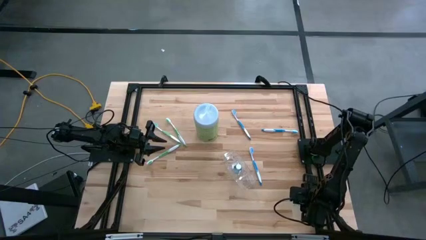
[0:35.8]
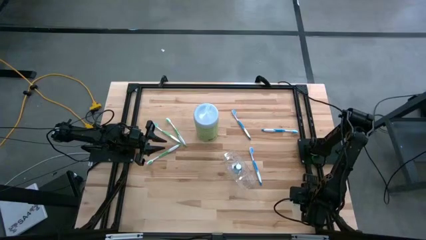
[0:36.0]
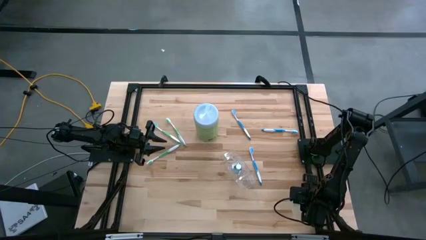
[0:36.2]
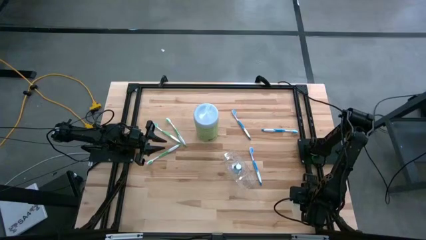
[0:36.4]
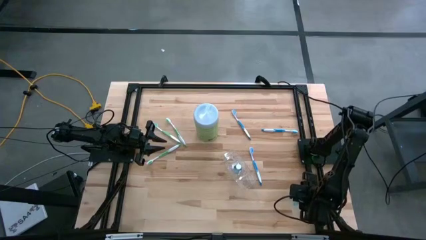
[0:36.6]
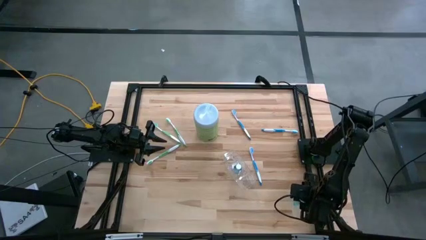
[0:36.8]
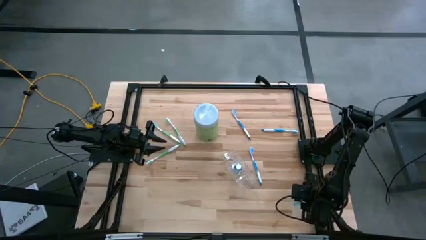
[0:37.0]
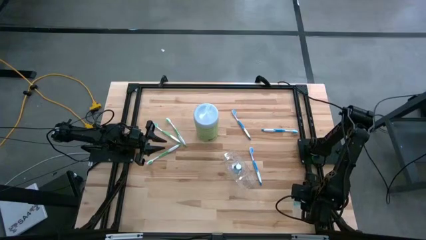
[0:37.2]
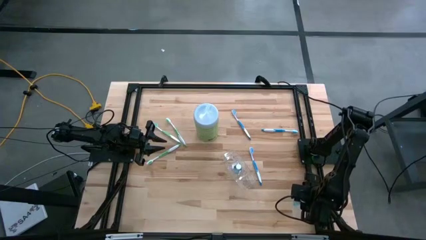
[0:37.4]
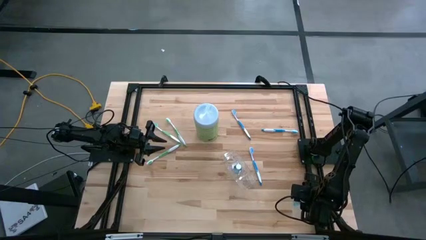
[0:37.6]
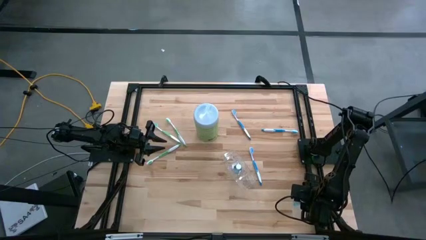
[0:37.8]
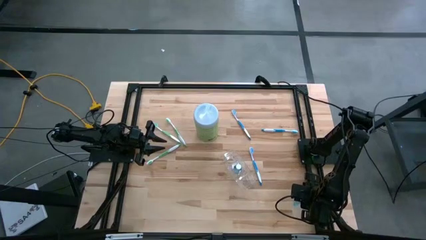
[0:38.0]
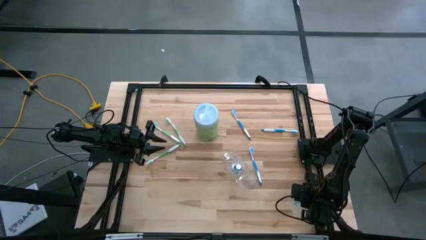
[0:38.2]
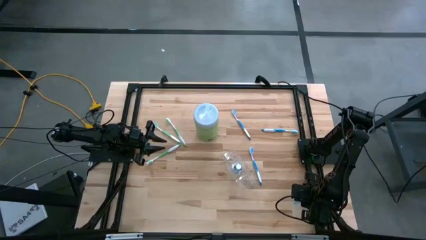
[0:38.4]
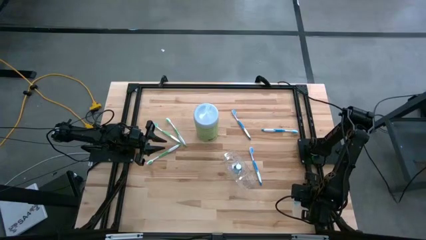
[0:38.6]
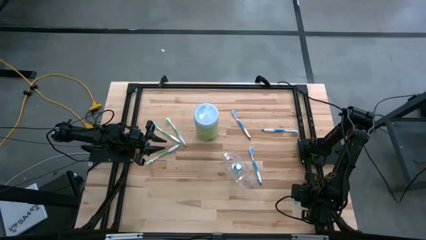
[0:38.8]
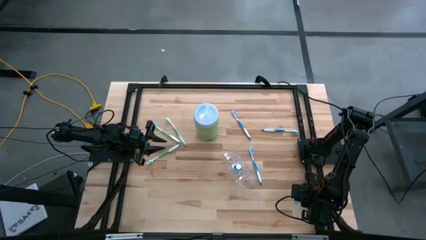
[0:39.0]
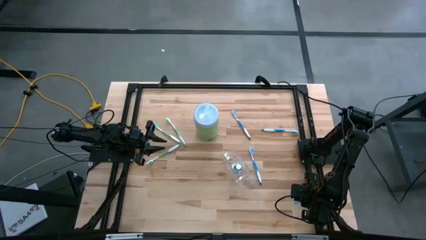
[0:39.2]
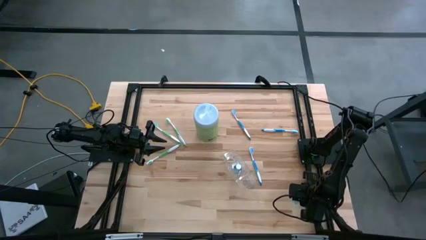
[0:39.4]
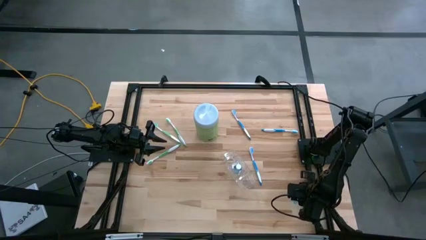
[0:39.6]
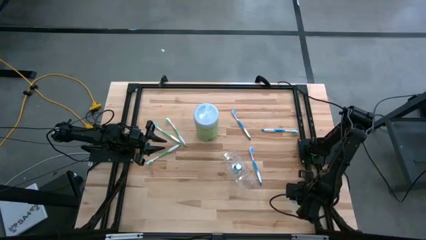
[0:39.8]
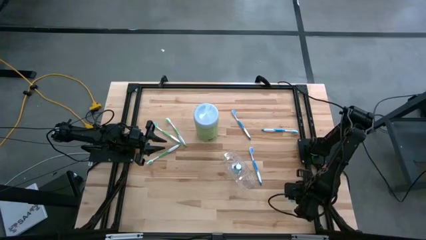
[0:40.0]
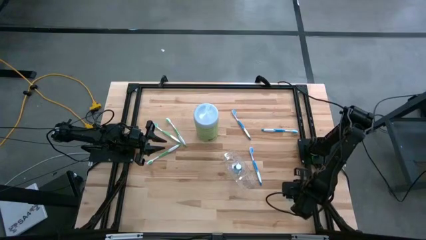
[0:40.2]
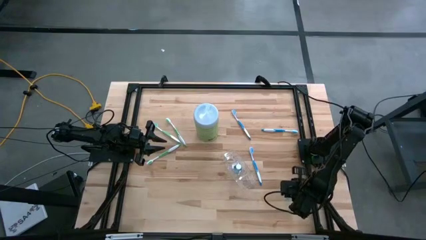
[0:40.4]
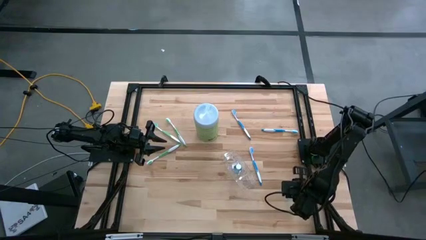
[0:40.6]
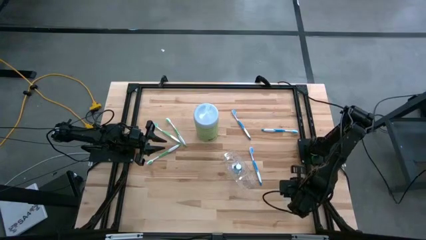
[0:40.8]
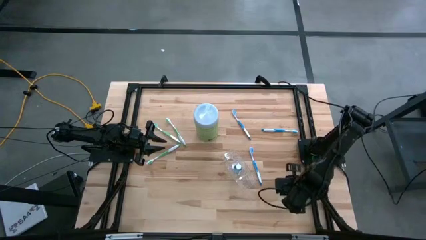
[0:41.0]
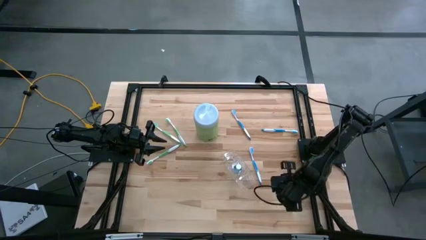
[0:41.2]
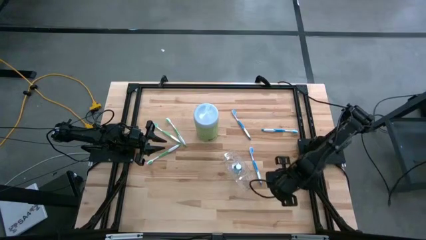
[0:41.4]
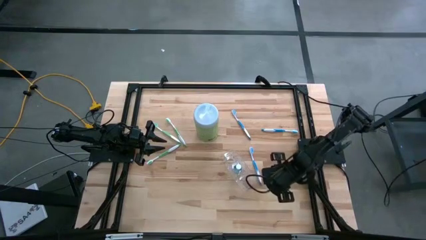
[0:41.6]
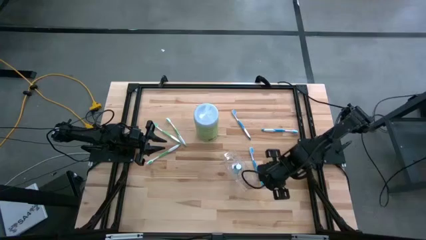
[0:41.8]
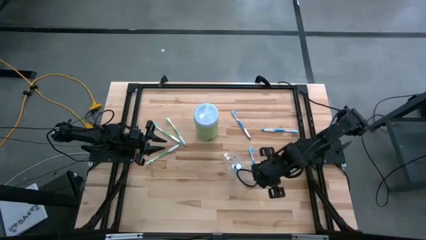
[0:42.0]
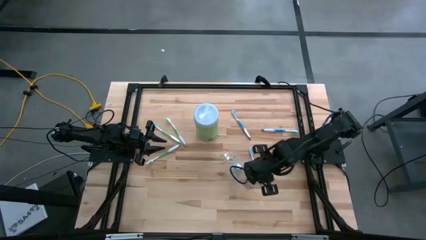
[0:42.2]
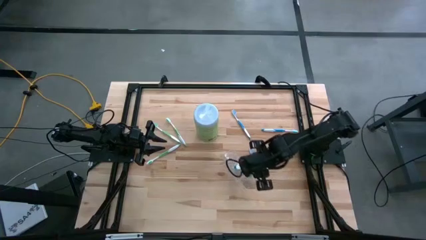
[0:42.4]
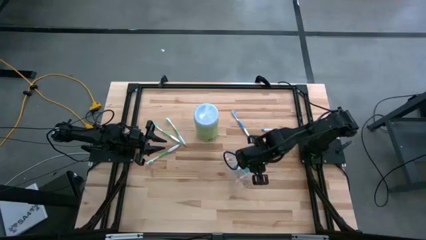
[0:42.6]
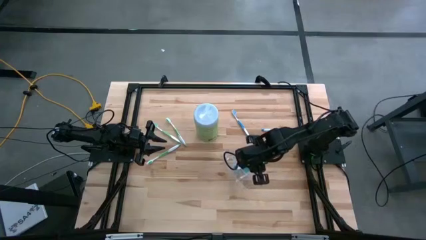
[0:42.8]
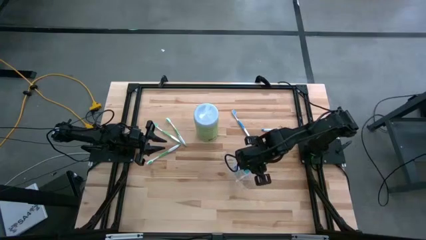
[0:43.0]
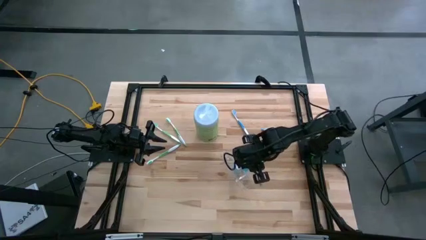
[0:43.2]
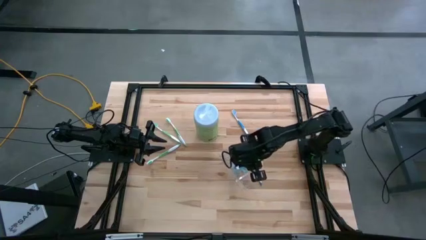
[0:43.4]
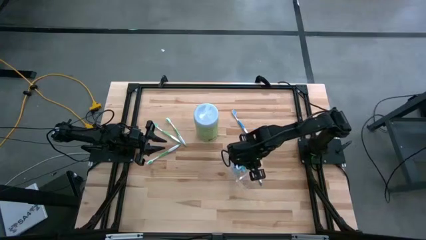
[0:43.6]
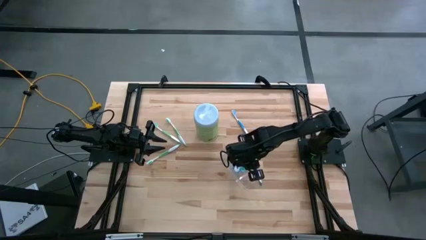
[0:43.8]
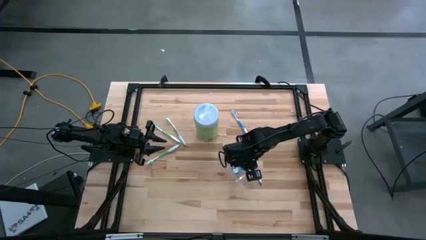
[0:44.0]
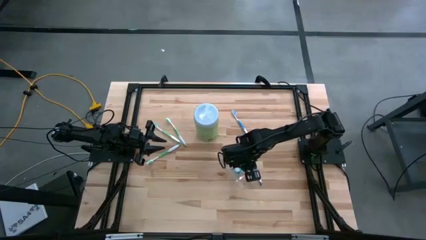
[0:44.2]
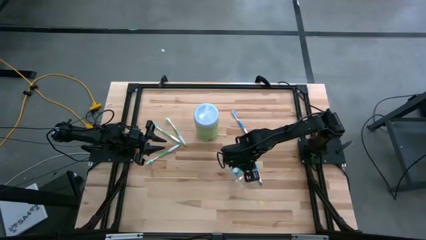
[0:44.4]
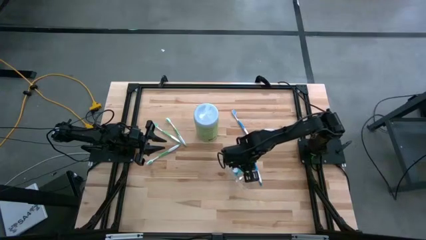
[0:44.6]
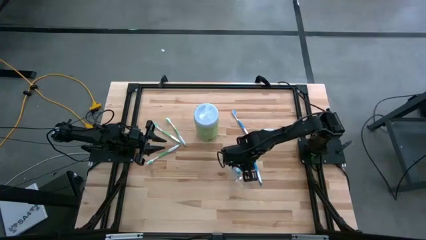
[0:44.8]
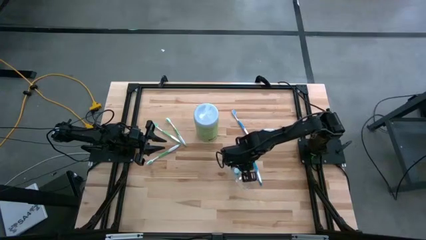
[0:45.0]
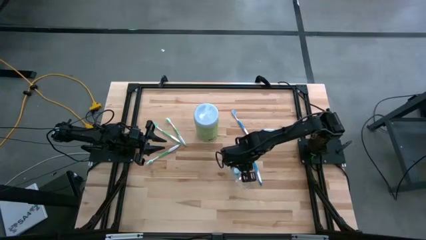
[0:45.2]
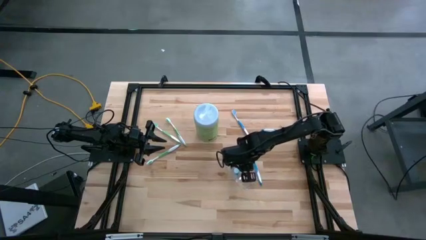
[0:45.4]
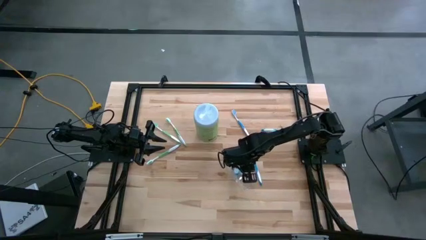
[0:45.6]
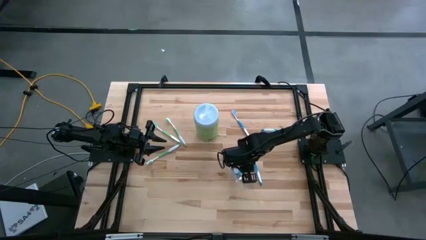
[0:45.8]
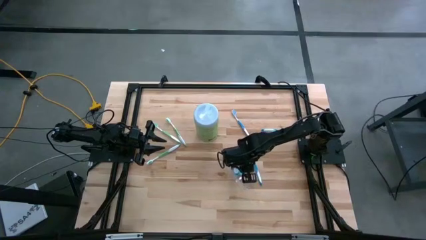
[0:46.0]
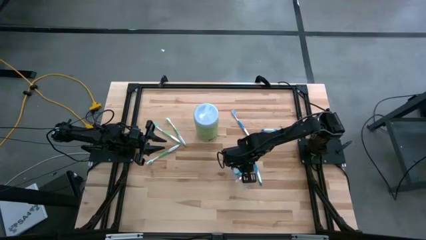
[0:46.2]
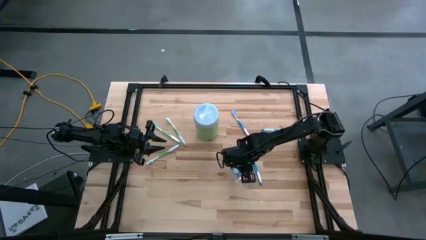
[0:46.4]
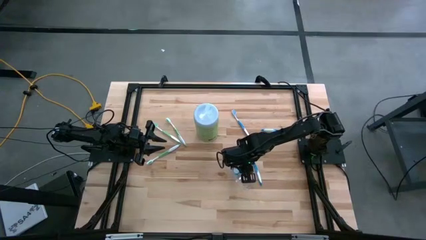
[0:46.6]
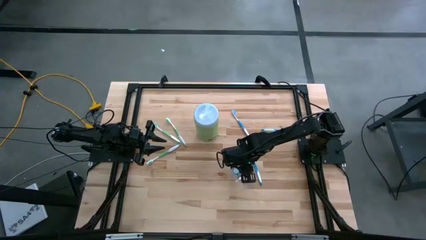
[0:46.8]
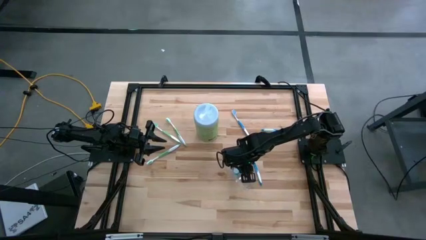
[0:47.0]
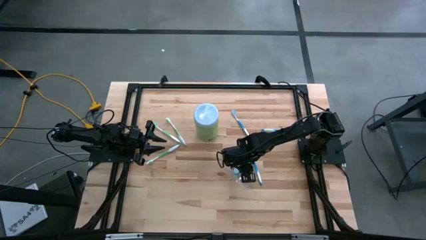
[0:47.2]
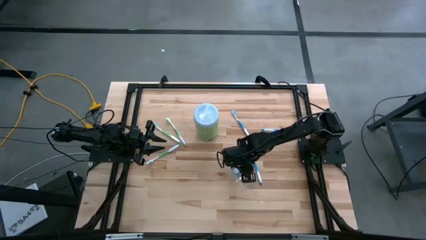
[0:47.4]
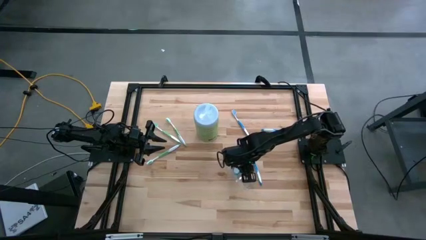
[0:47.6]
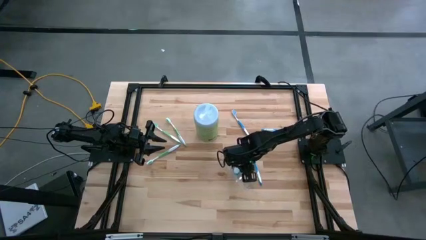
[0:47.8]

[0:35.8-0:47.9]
Task: Pick & Place toothbrushing station
Put the mouthwash into the transparent organizer

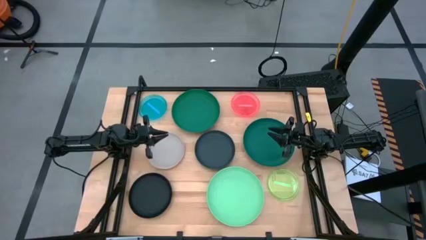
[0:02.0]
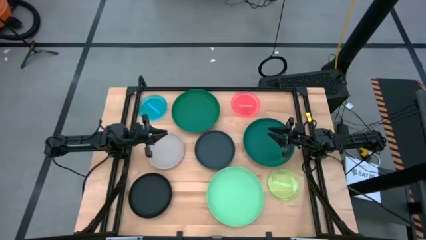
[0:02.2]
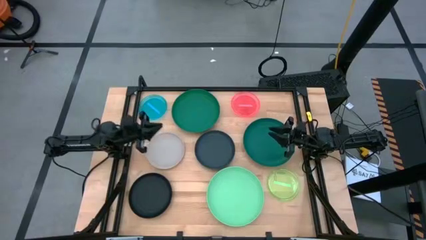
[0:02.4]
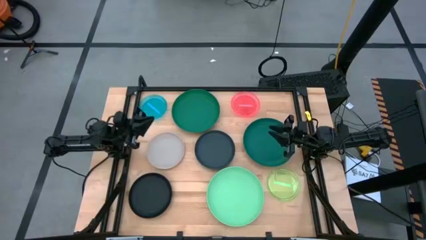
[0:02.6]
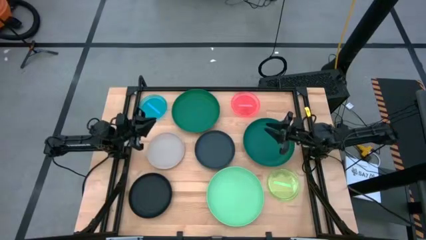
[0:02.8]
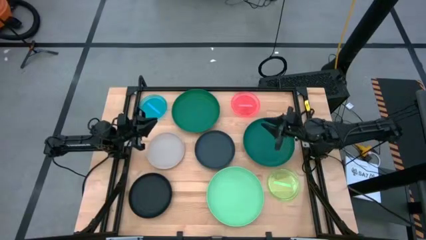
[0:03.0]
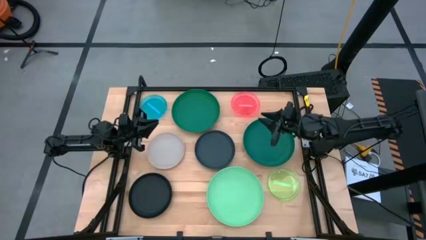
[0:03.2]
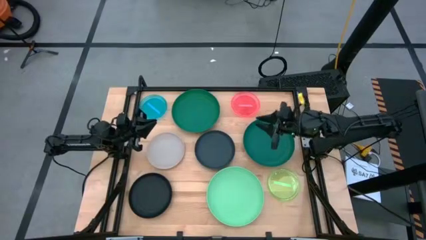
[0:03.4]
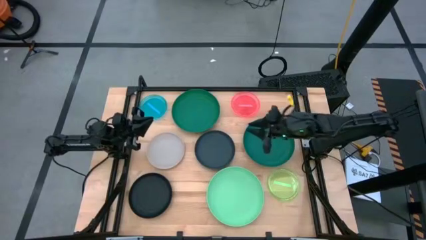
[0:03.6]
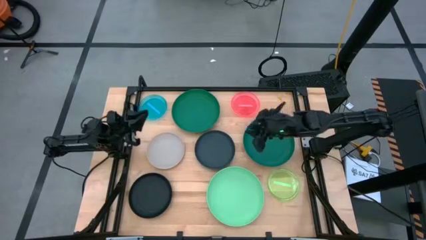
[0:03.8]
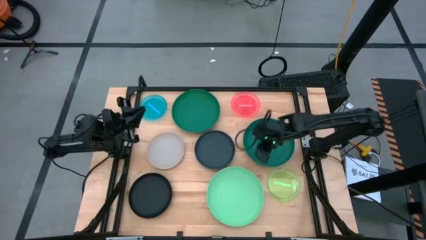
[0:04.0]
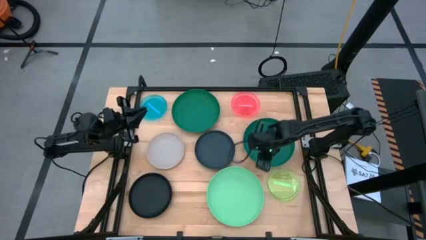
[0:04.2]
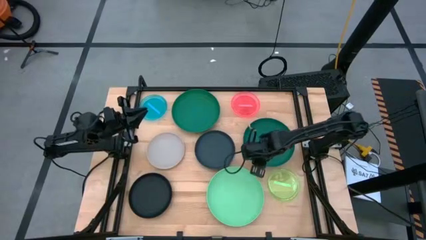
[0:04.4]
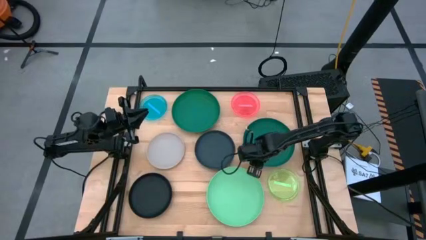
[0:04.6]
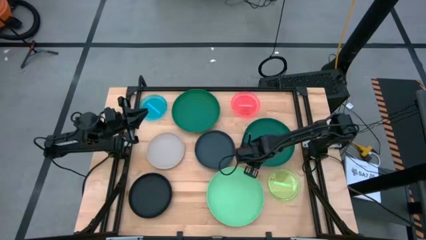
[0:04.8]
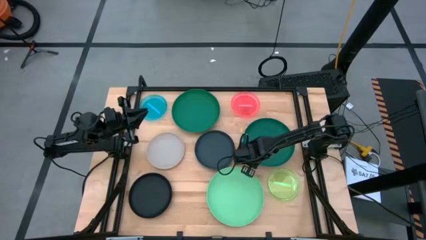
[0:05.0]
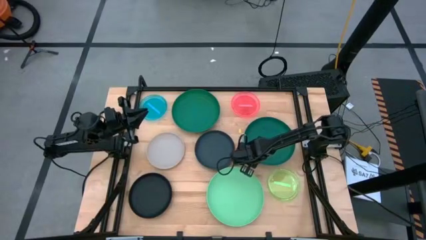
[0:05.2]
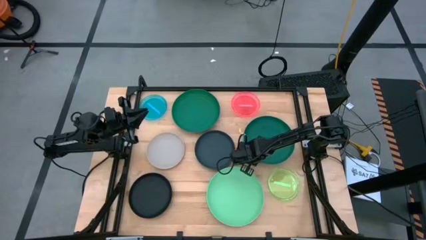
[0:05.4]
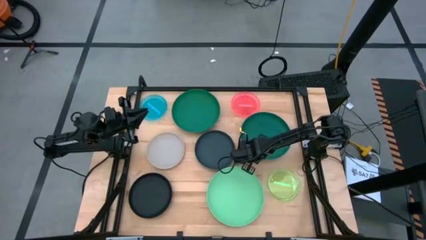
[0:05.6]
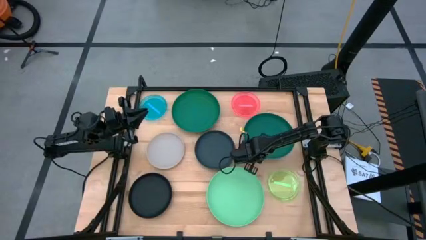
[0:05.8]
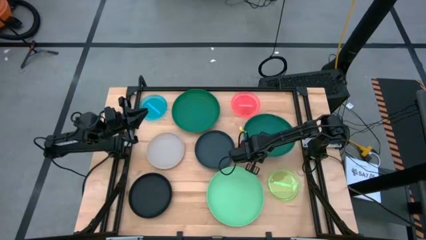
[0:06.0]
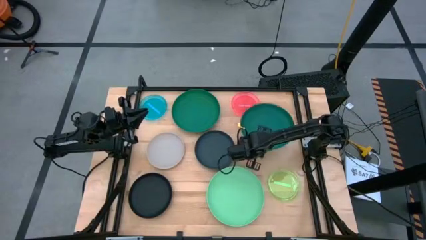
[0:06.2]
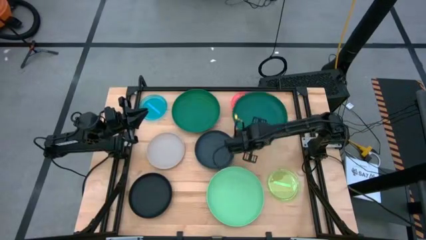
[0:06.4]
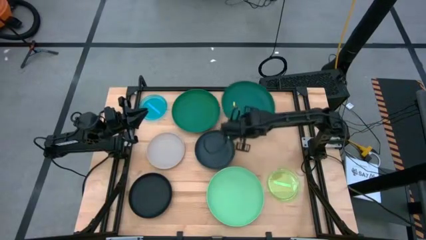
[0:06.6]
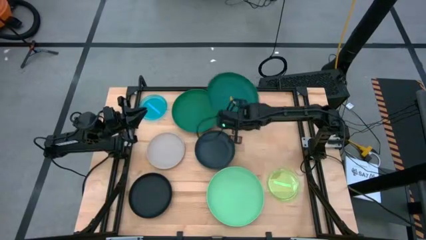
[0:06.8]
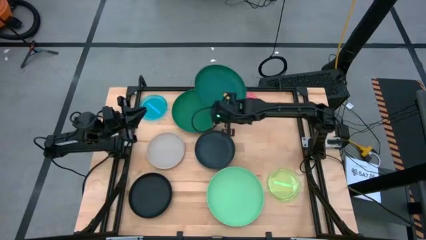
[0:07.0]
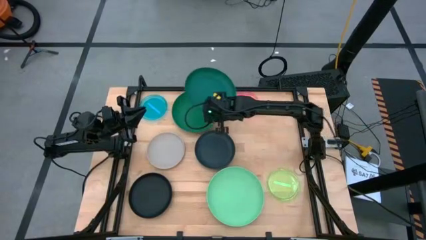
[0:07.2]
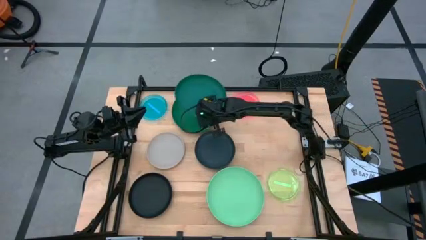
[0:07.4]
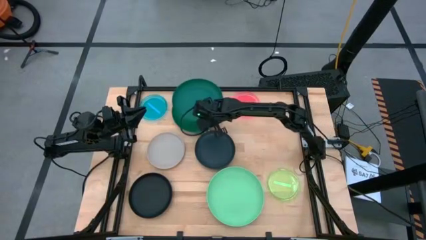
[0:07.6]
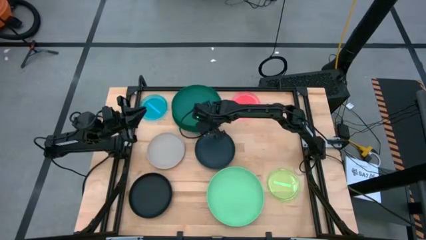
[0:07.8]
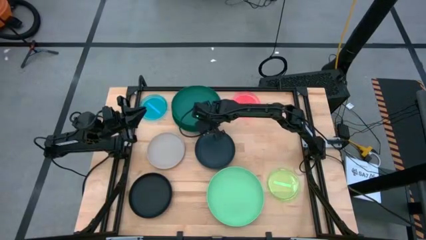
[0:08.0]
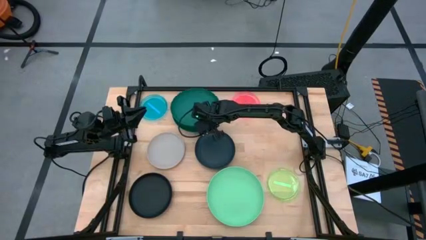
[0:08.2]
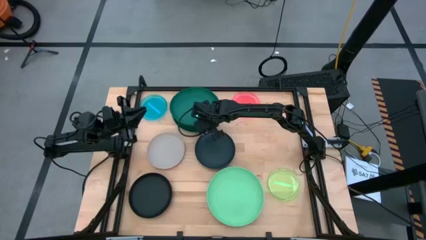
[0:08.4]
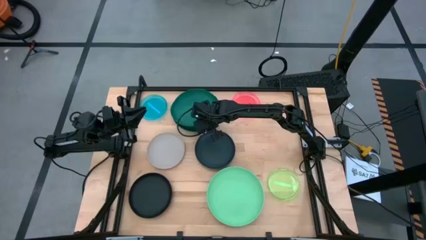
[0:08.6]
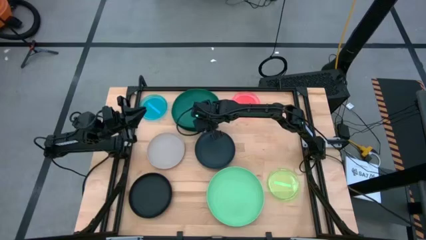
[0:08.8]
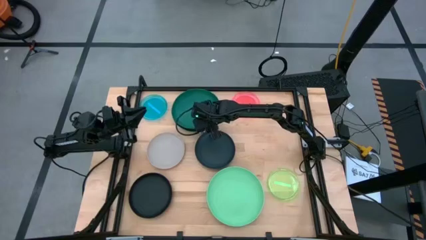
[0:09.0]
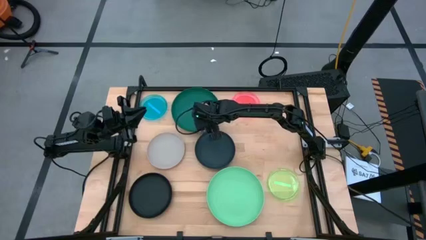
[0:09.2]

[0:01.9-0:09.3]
Task: Stack plastic plates
Stack the dark green plate on the green plate
